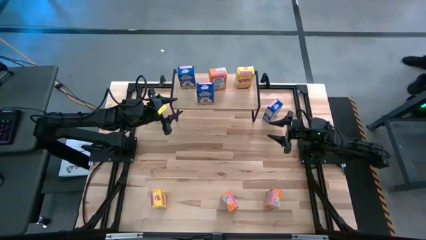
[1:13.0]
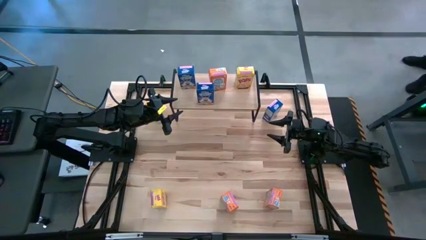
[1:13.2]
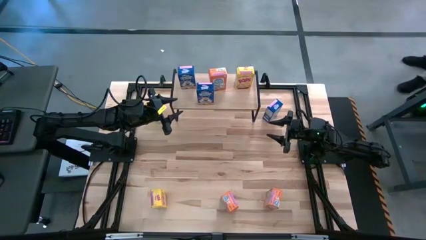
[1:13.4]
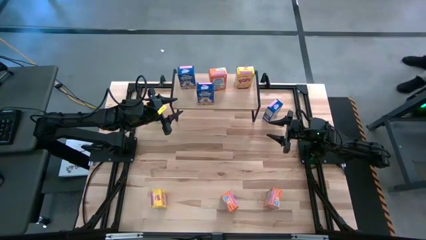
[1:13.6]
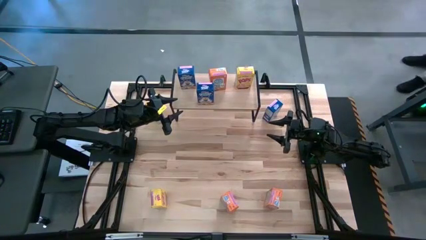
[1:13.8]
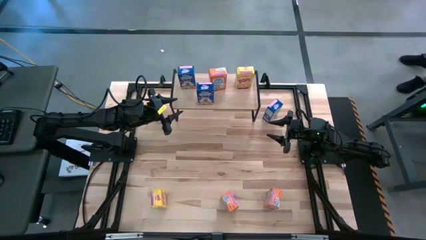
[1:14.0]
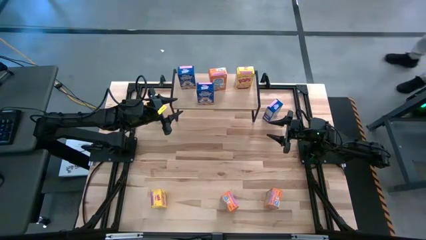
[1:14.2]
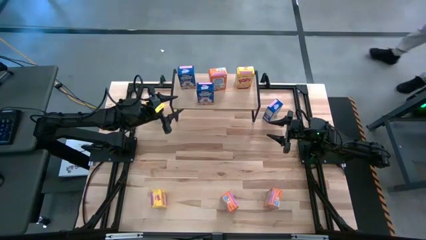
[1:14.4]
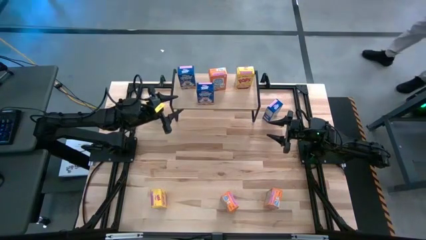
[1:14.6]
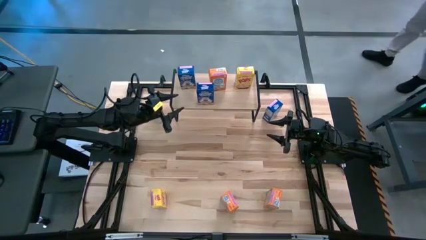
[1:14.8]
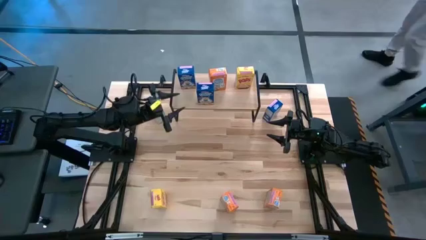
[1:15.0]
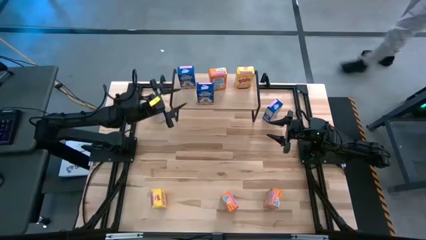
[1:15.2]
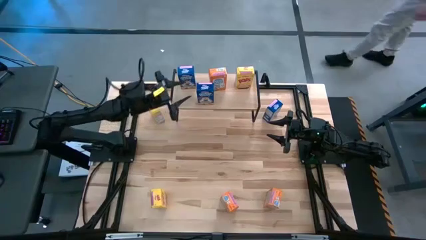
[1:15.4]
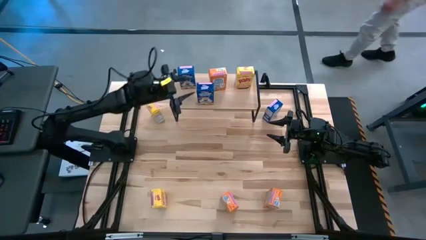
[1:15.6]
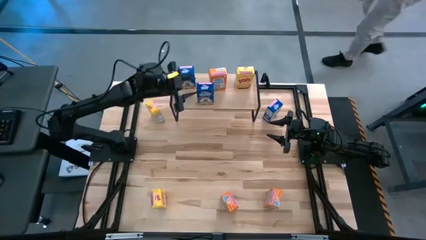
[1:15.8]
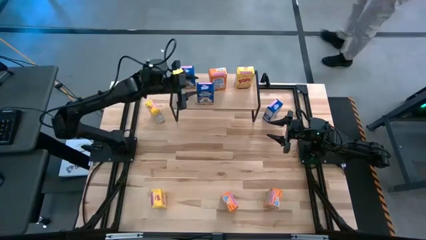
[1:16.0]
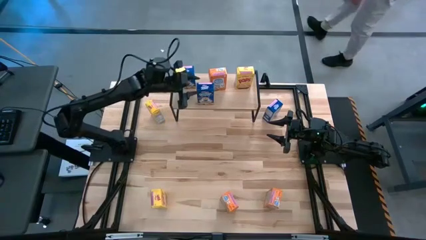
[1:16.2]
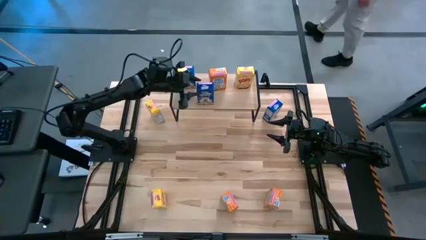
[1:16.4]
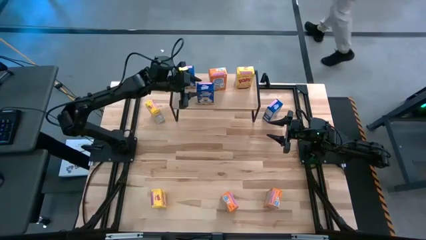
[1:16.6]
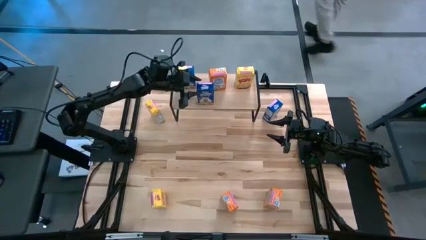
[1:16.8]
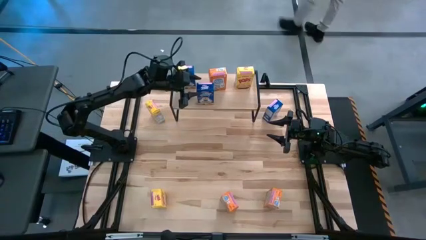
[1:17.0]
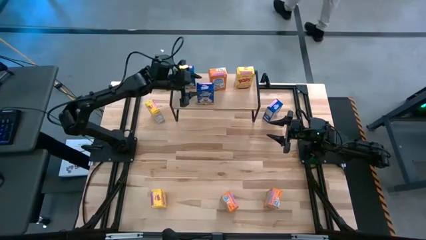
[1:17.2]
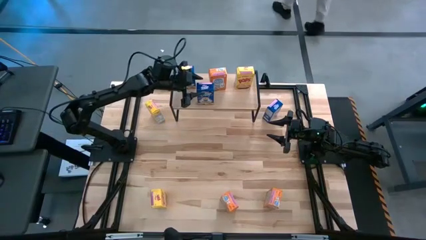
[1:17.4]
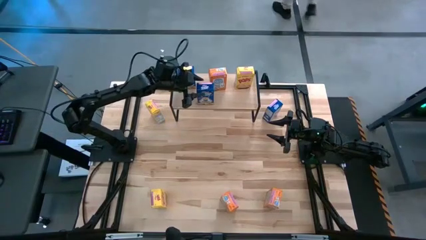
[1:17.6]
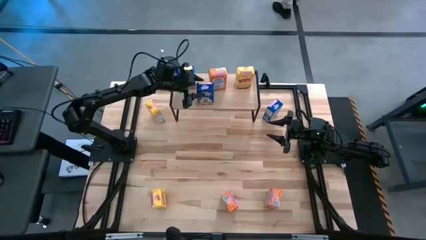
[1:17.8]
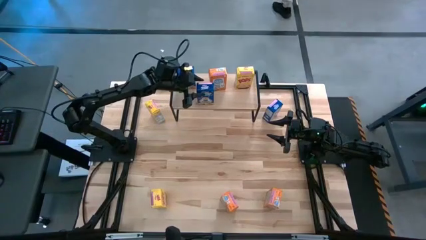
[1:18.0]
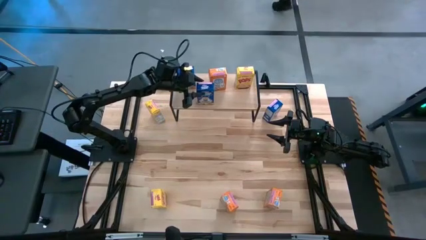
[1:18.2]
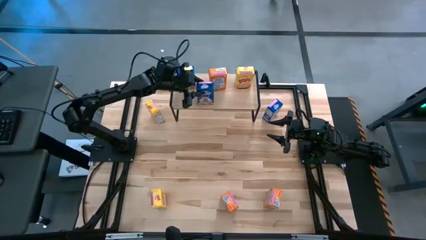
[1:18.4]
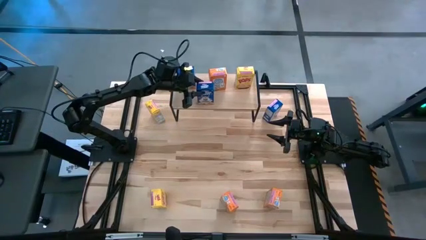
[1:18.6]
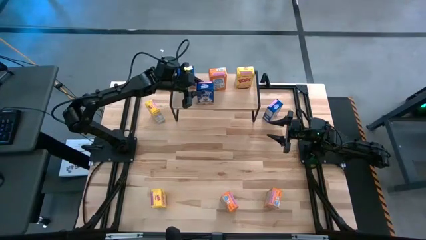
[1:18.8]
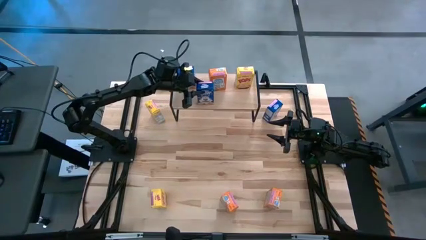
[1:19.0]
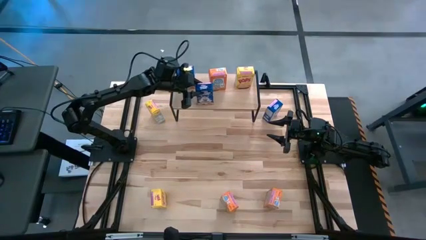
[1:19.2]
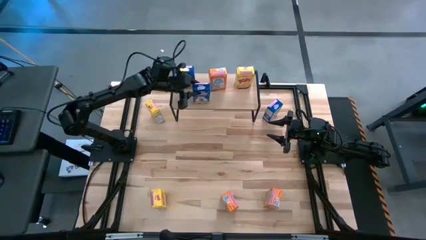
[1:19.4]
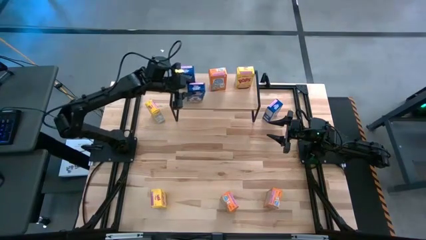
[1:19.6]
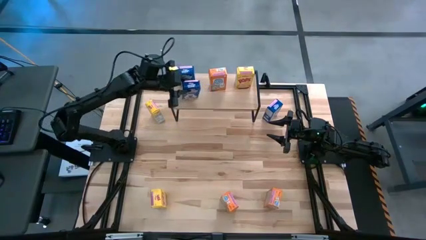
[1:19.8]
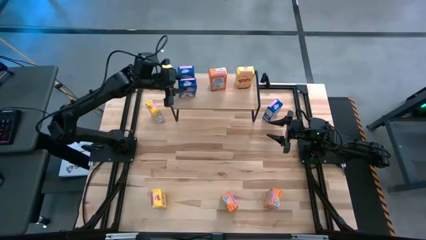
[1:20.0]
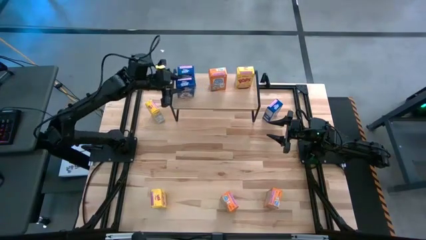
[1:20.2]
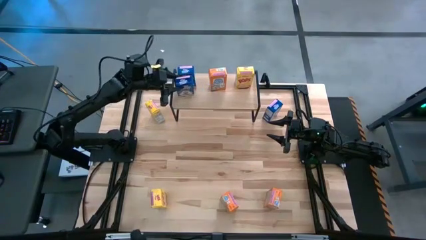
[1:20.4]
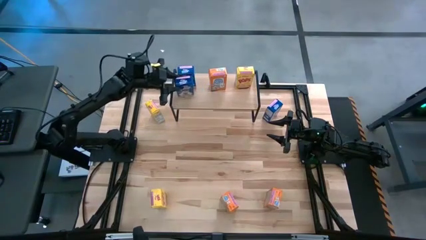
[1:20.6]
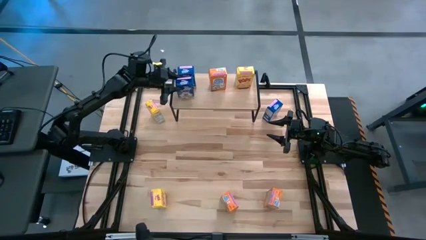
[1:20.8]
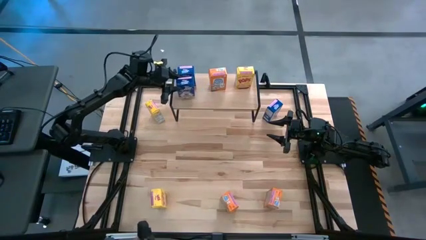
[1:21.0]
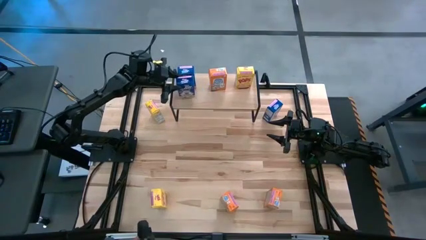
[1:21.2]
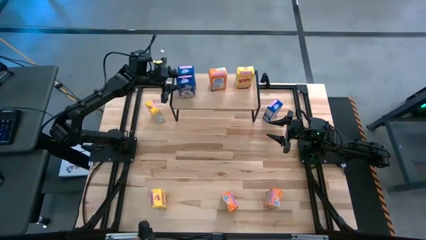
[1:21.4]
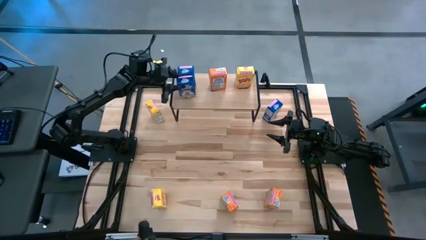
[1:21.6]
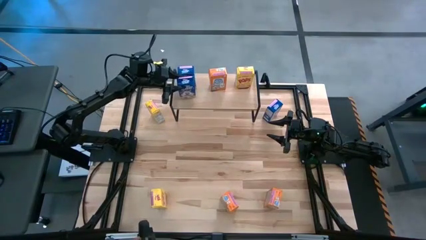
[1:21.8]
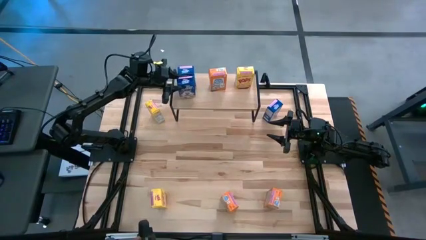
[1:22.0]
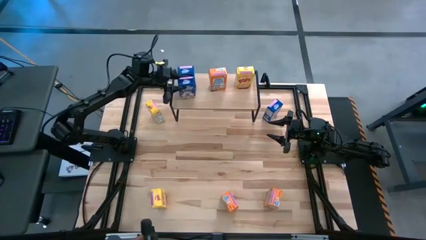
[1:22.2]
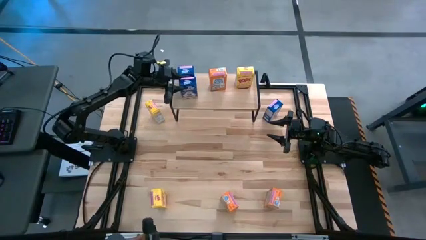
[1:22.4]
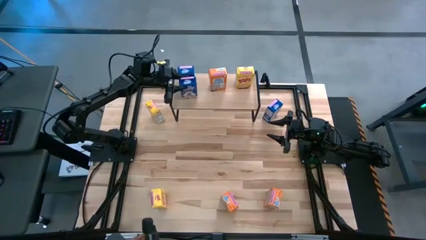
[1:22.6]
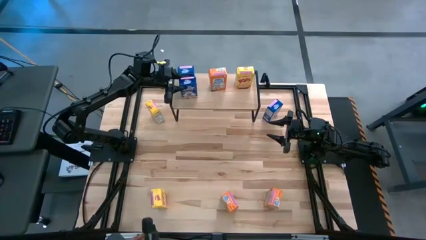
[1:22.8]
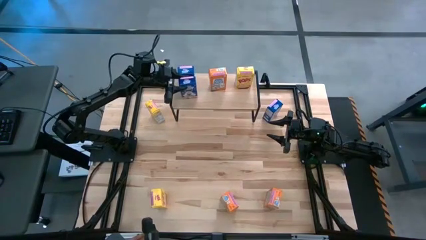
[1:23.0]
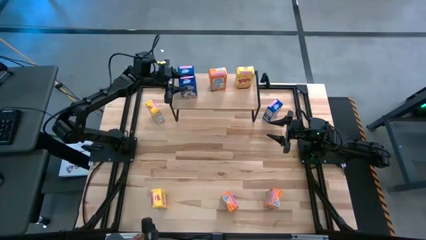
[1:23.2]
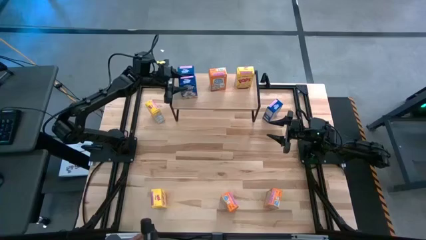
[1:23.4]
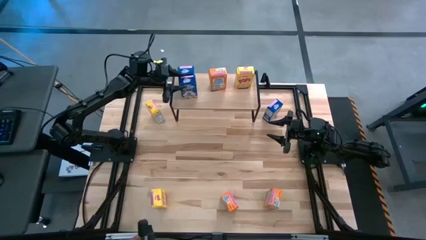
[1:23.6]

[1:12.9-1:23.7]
Task: Stack cereal on shelf
Put the bottom blue cereal box aligned with the other blue cereal box on the shelf
